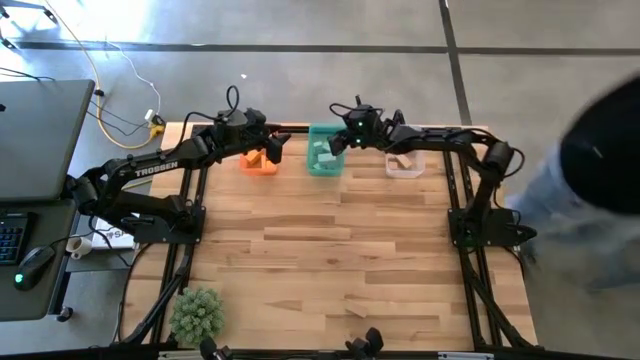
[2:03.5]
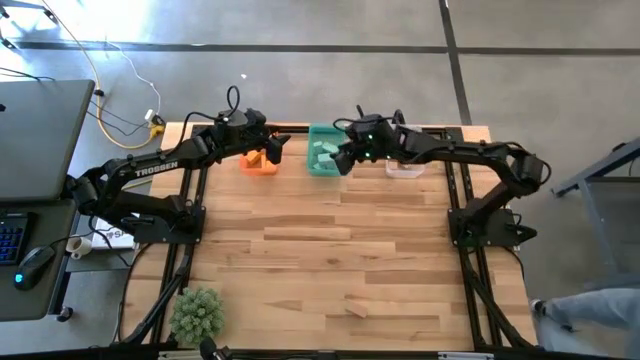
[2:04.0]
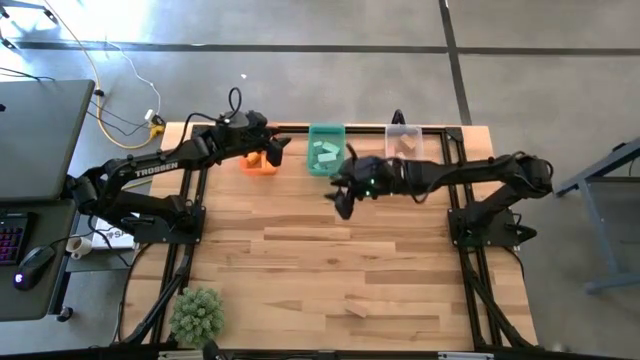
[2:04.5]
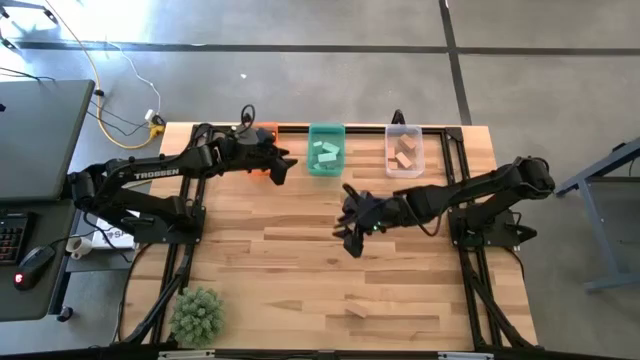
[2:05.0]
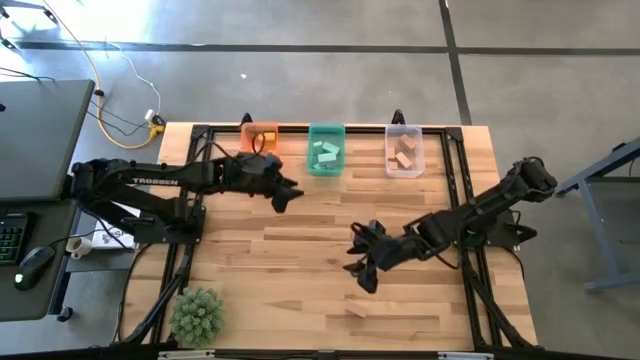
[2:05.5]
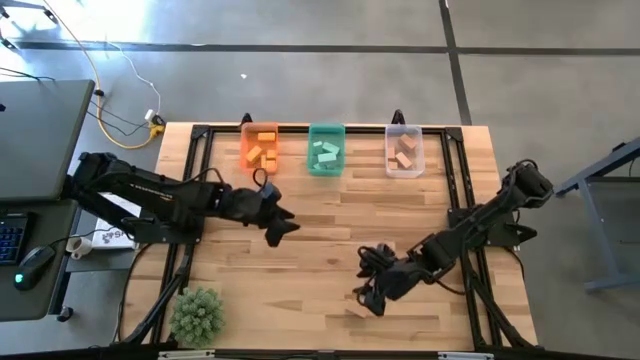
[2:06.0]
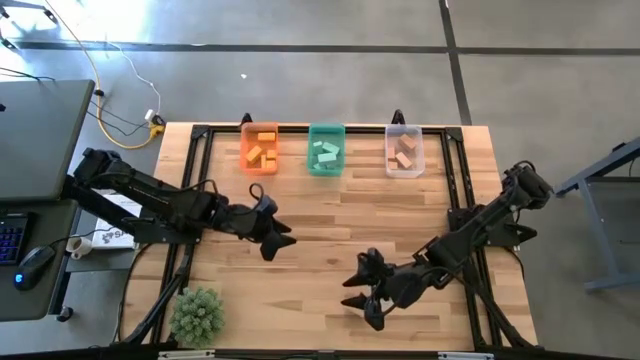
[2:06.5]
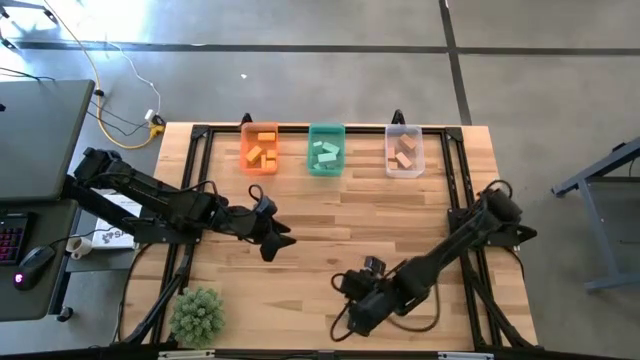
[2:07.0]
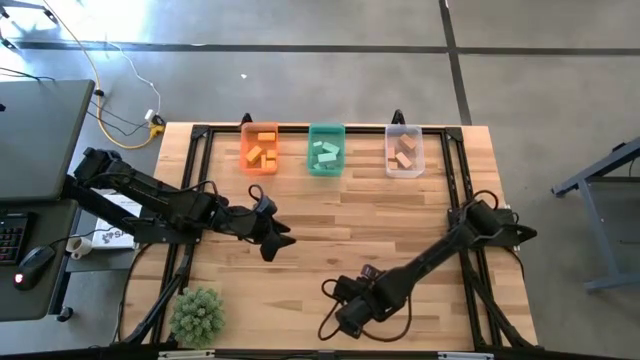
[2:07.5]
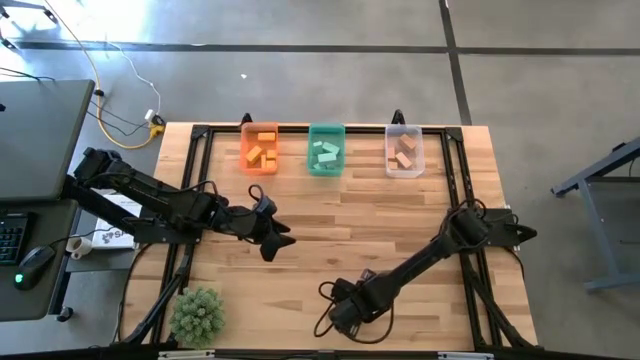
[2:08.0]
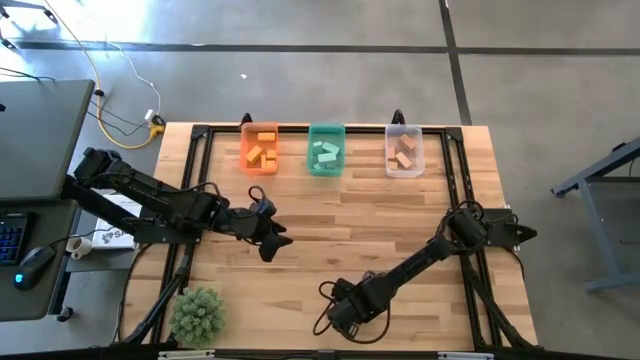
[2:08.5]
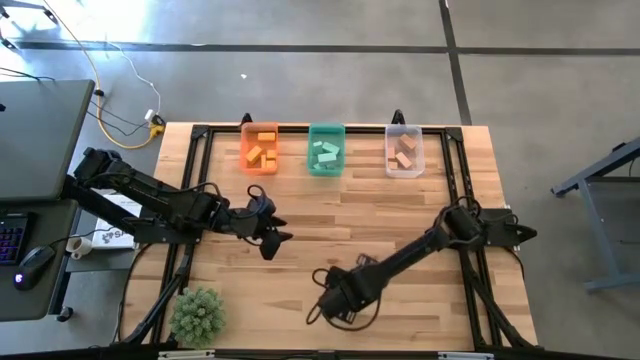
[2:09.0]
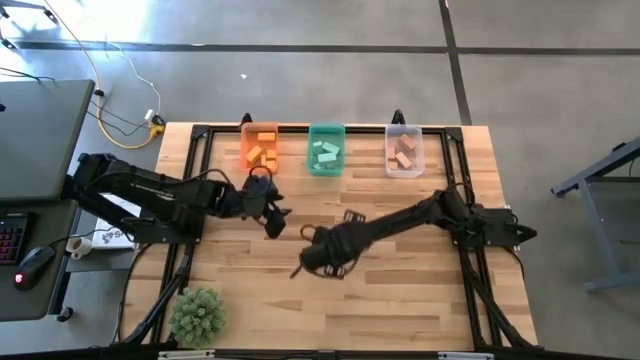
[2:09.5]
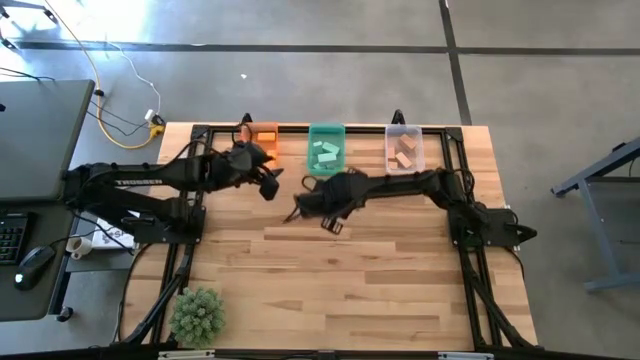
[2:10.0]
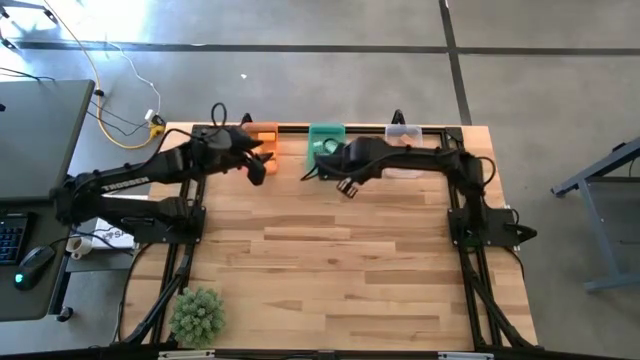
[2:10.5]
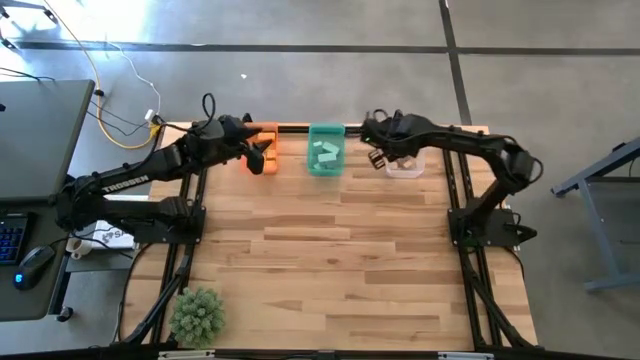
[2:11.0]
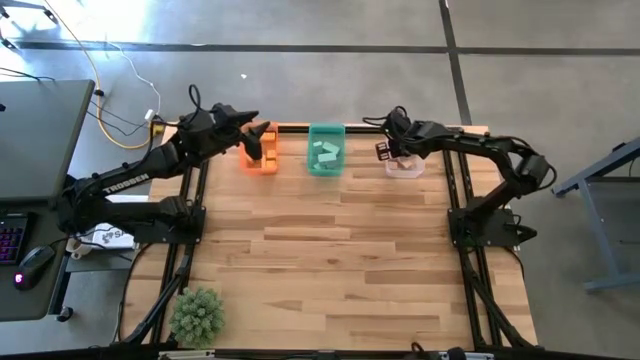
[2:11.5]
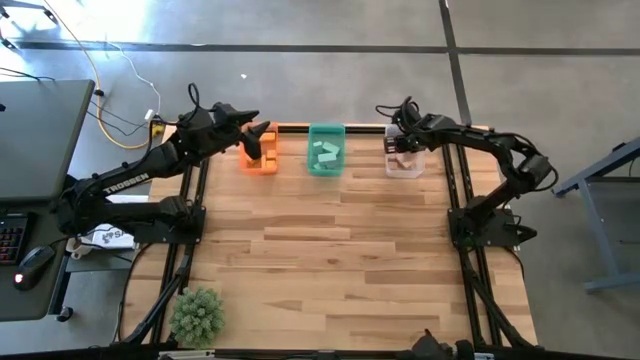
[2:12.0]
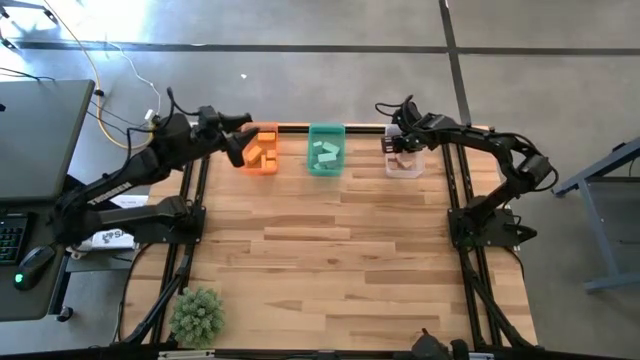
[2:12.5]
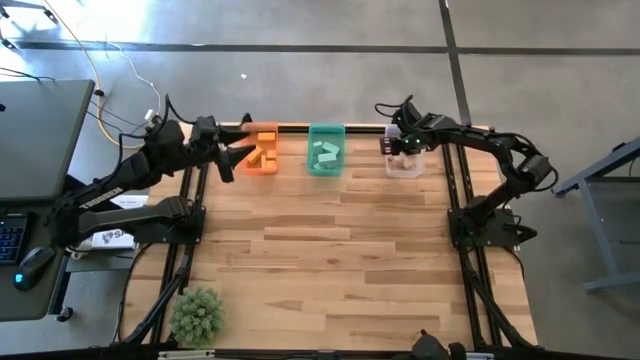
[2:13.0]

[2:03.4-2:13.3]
Task: Sort & place blocks by color
Put the brown block into the white bin

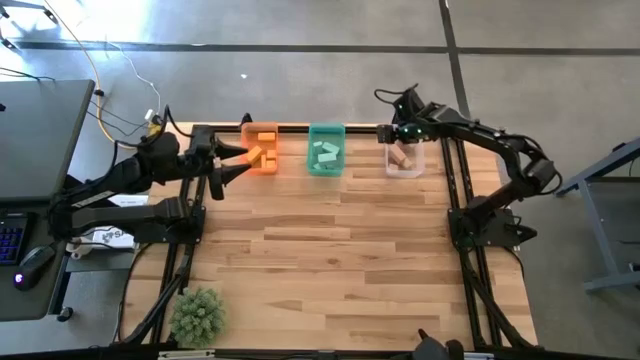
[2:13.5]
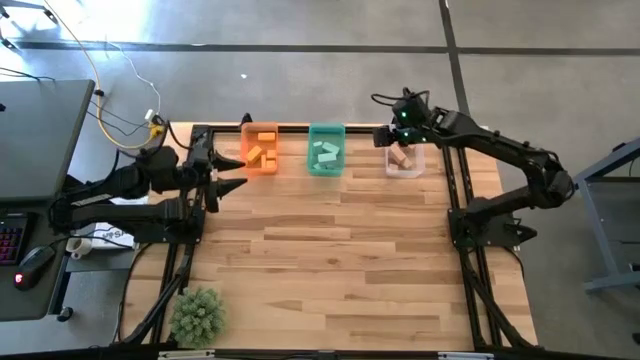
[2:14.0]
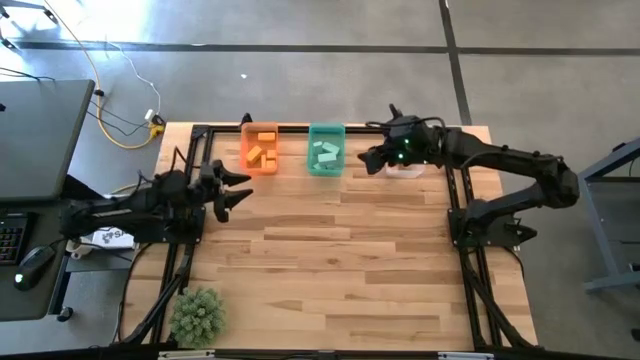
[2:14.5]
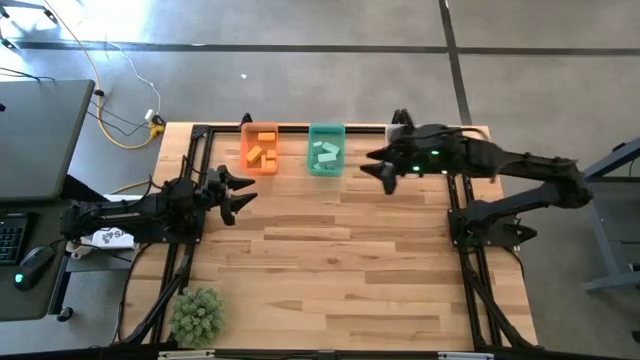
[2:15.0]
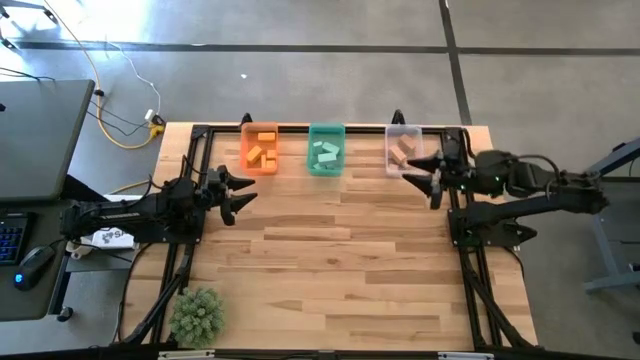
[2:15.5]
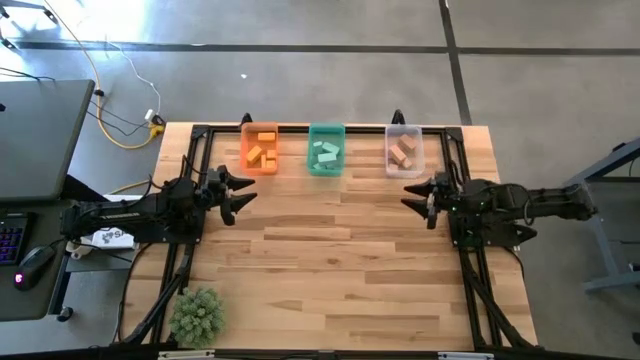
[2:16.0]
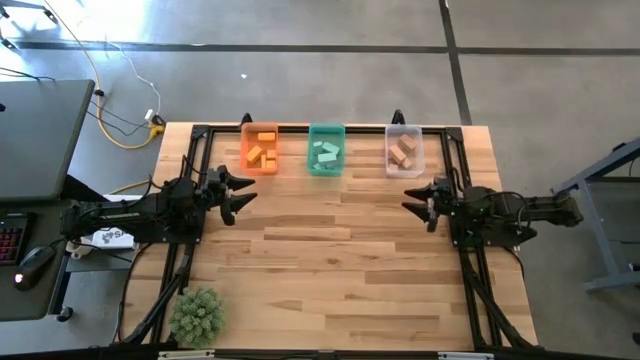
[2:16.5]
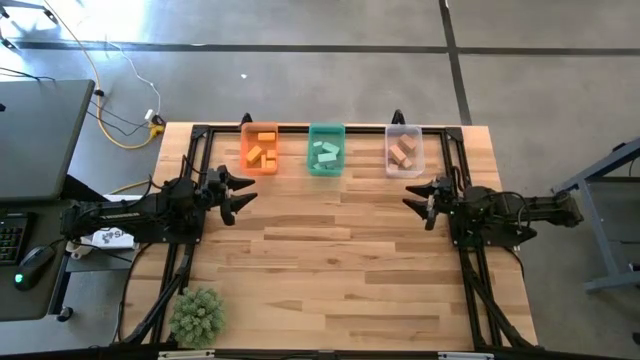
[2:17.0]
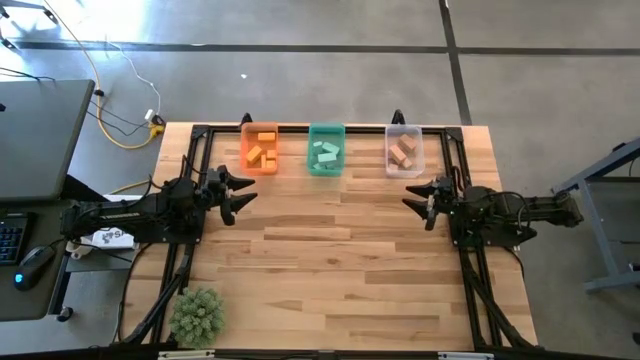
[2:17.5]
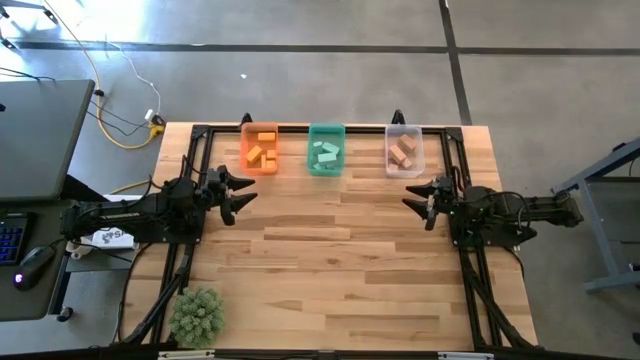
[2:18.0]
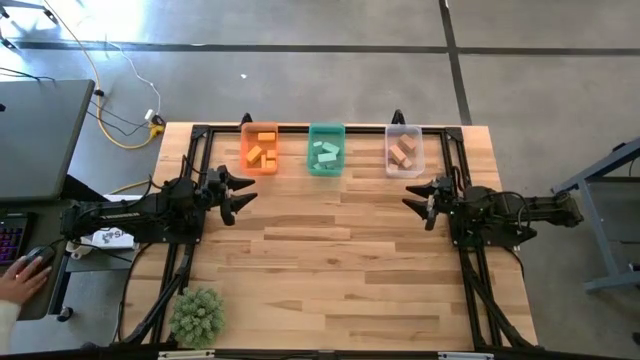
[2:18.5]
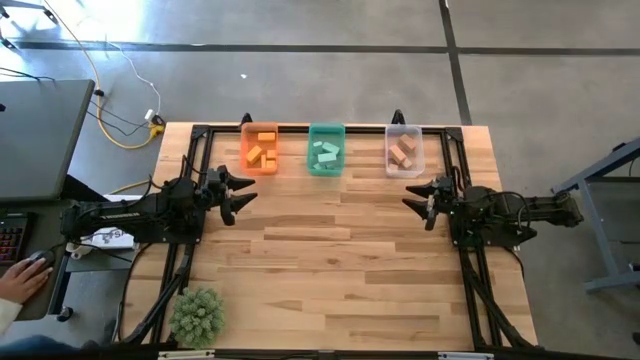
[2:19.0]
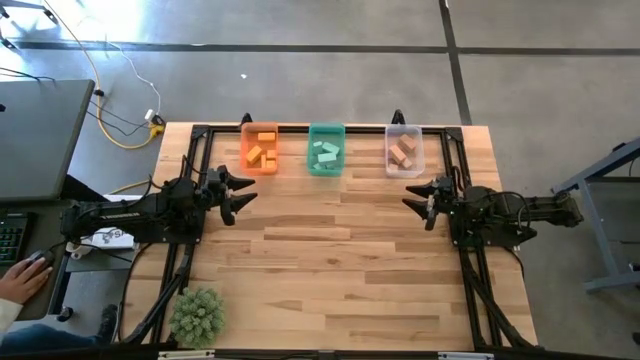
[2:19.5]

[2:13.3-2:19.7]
Return to Home Position

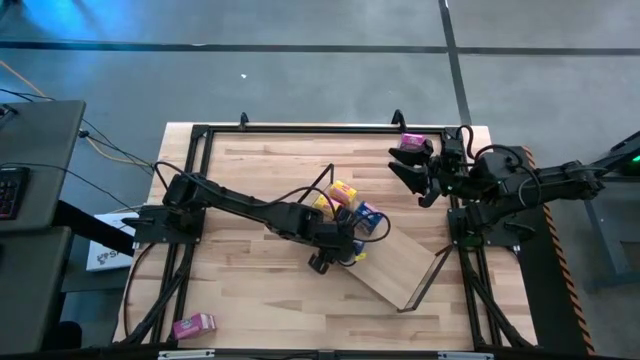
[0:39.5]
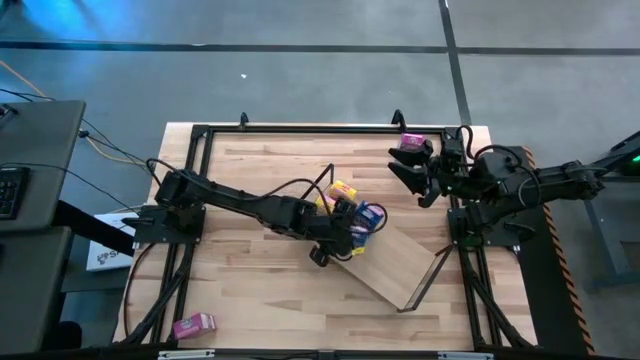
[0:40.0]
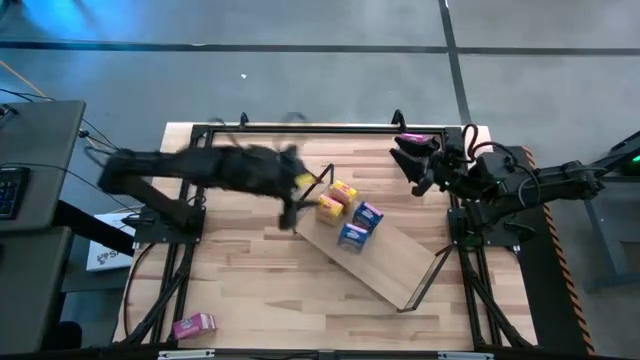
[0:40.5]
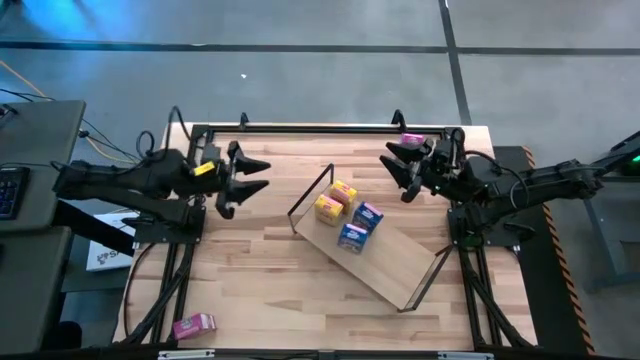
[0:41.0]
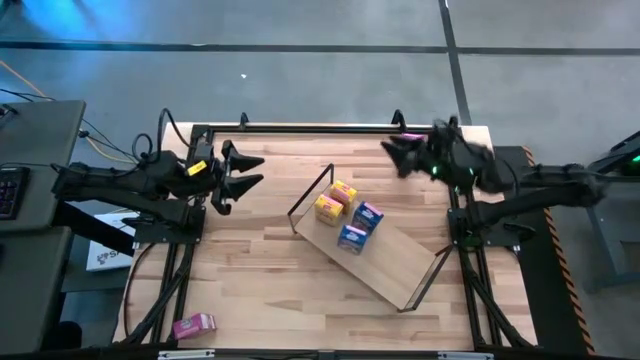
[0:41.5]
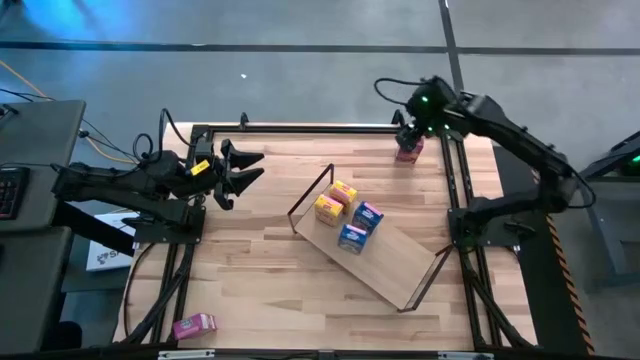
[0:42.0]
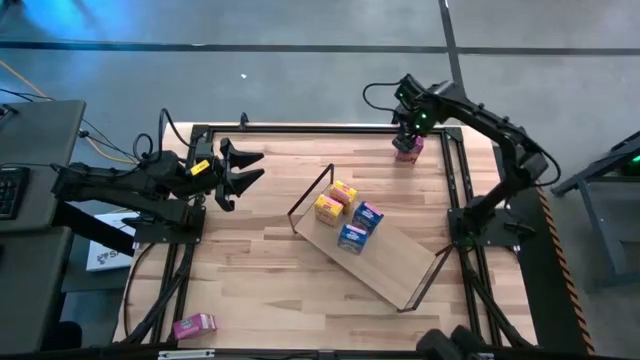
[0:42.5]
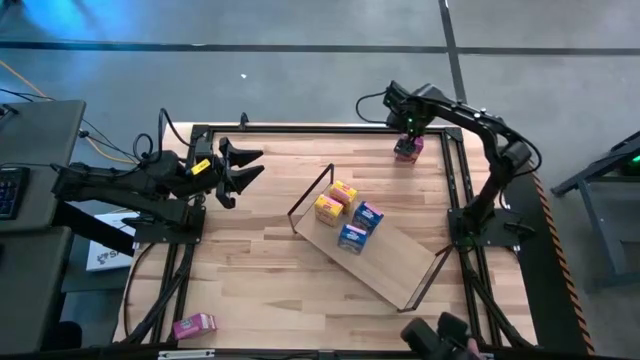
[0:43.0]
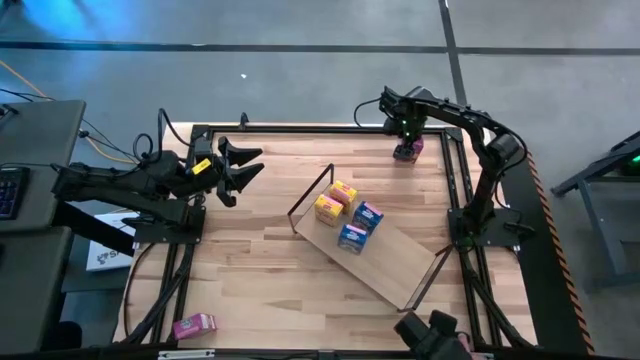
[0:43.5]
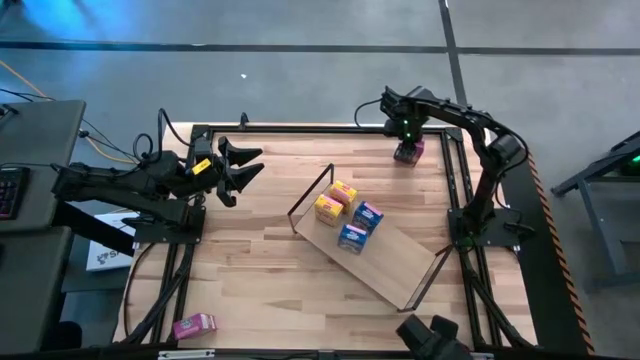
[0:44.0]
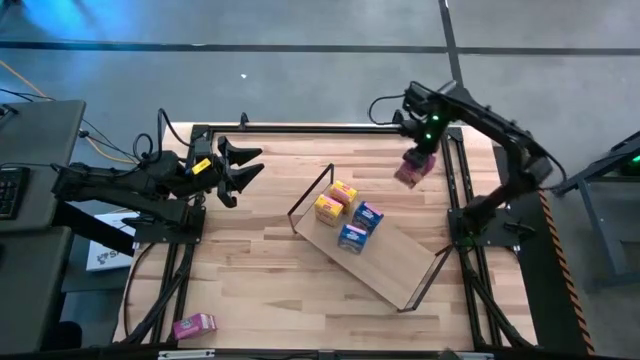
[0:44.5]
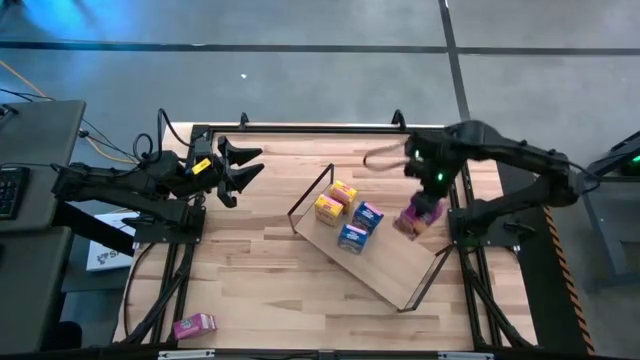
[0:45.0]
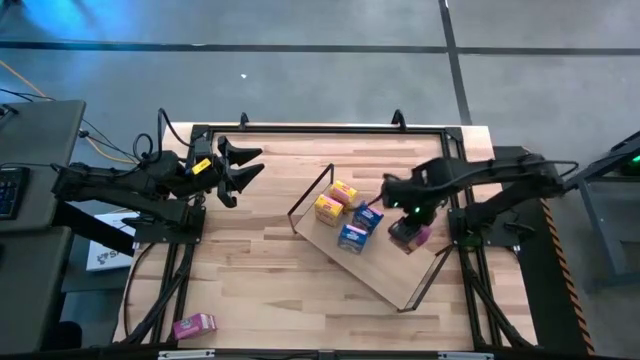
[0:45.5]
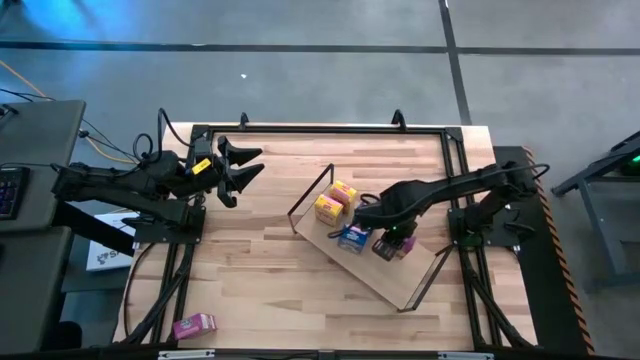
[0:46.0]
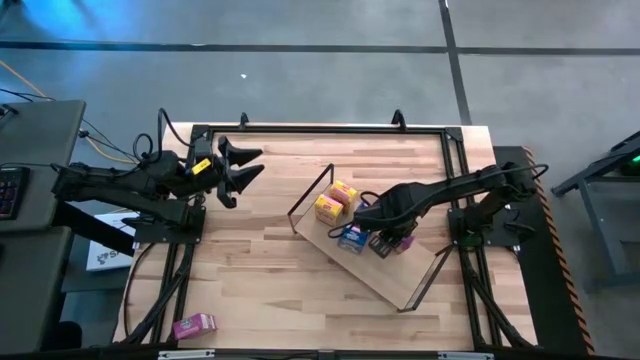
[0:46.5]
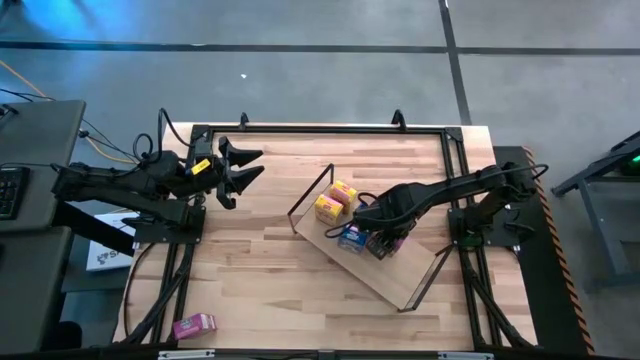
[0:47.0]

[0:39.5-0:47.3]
Task: Stack cereal on shelf
Put the top right purple cereal box on the shelf
